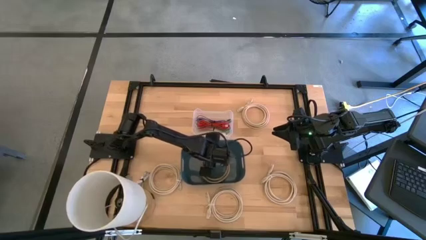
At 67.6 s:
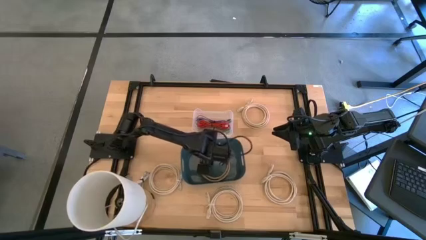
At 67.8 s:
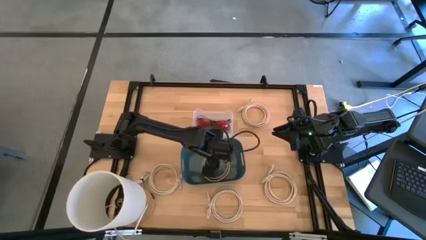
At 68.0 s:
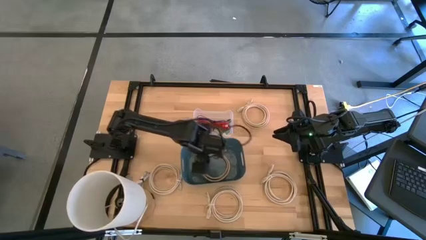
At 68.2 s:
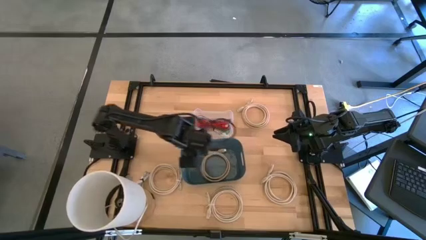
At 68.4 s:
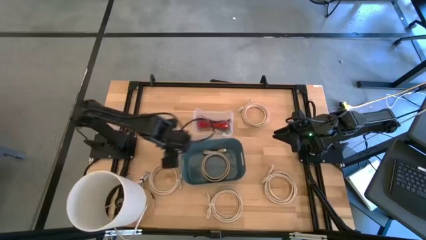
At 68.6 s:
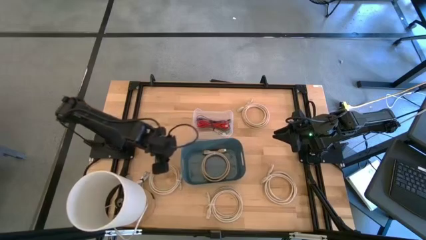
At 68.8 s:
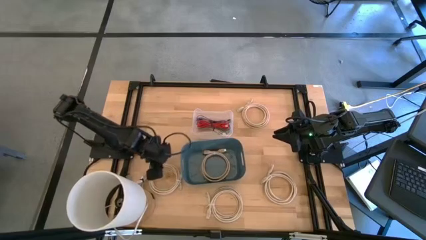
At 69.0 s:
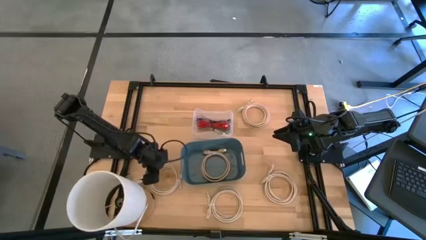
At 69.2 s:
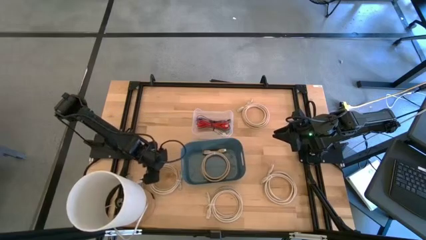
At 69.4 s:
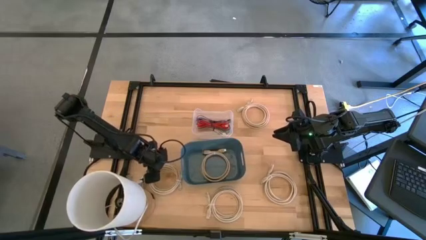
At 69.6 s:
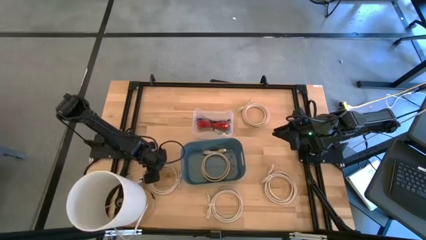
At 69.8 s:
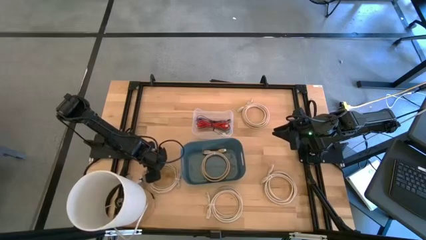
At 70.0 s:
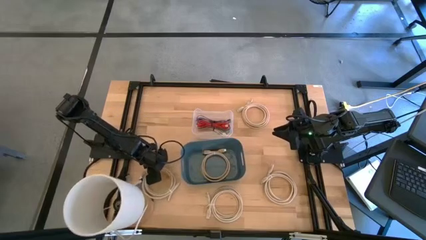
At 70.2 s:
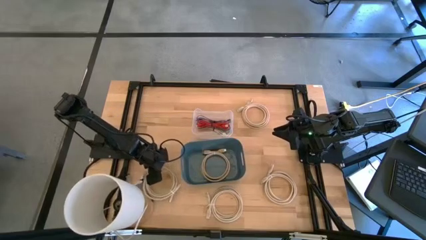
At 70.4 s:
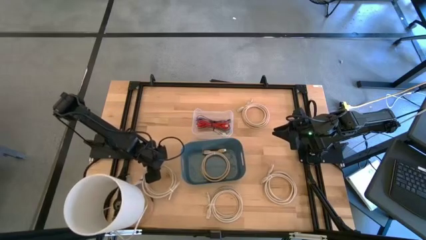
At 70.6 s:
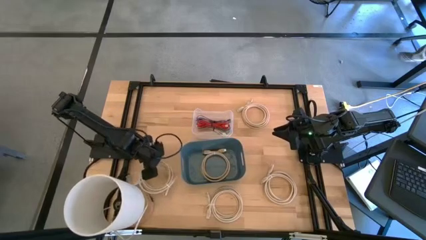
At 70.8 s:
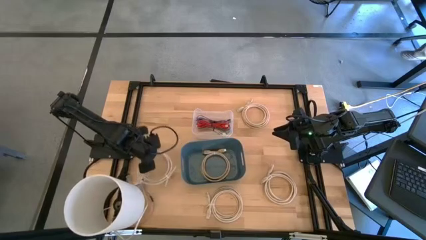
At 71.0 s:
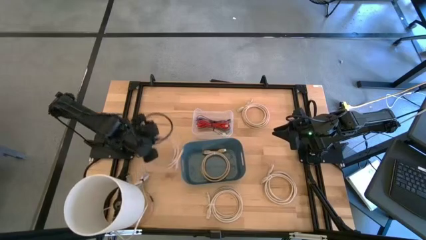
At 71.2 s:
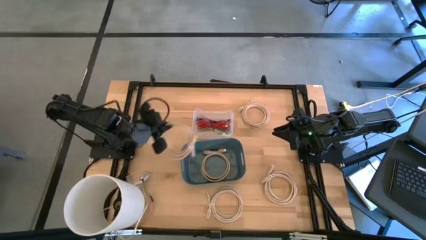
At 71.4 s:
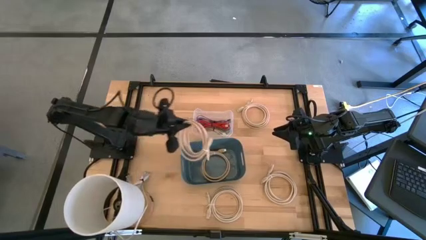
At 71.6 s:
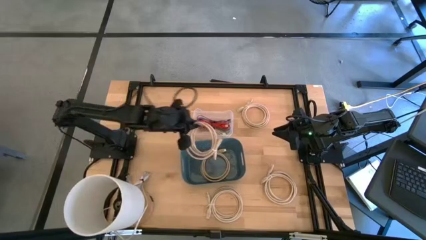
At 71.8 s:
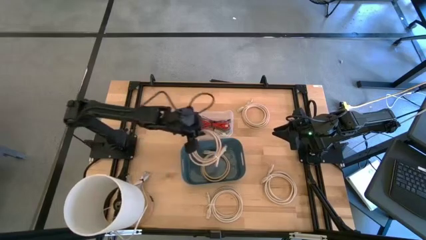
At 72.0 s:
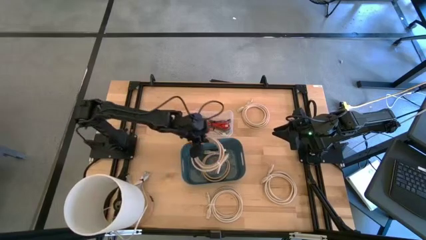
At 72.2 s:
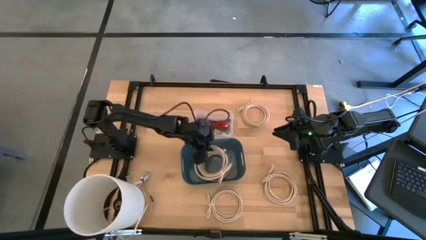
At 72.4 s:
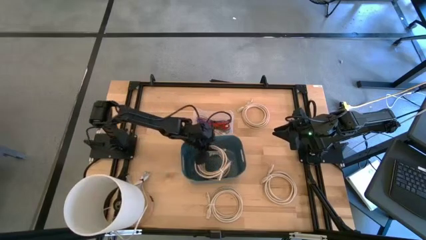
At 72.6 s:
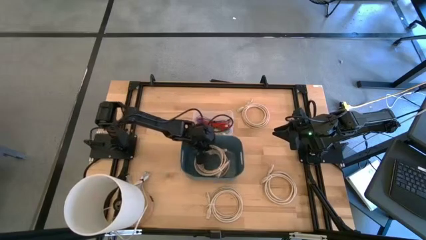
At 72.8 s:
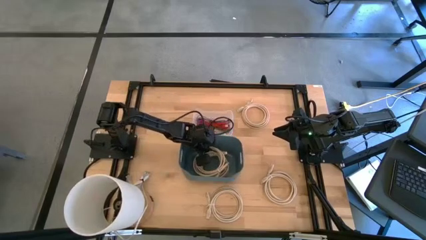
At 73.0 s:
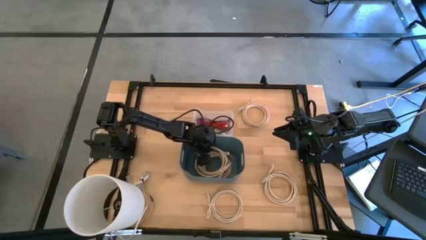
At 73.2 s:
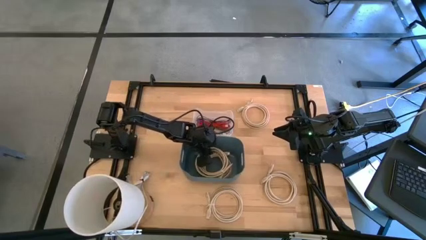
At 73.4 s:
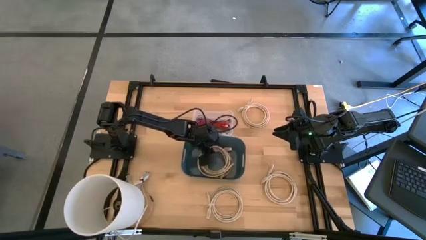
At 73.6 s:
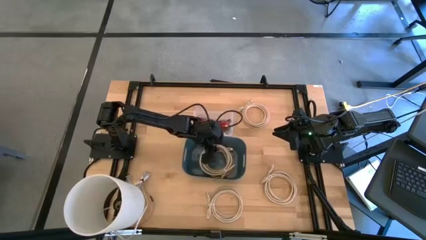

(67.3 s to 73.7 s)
Put the brown HDMI cable into the blue bin

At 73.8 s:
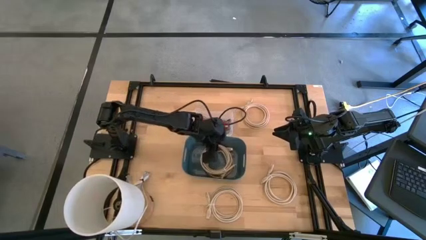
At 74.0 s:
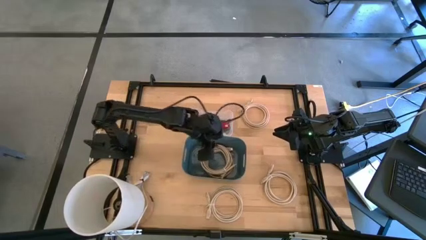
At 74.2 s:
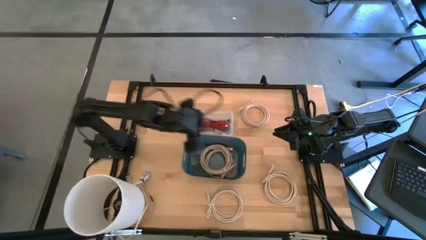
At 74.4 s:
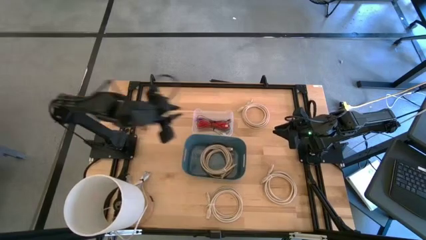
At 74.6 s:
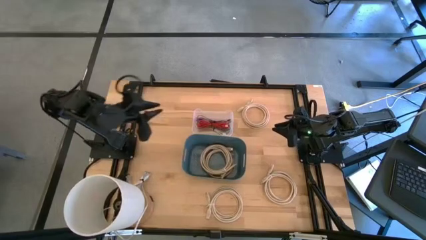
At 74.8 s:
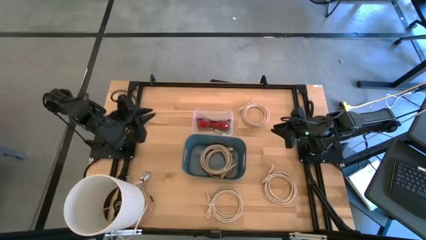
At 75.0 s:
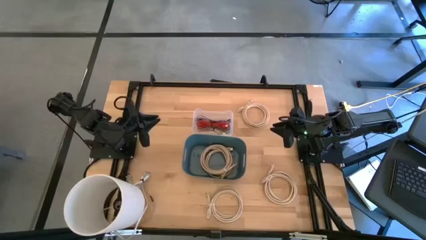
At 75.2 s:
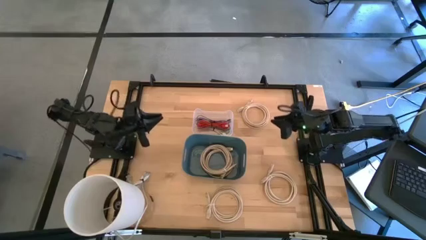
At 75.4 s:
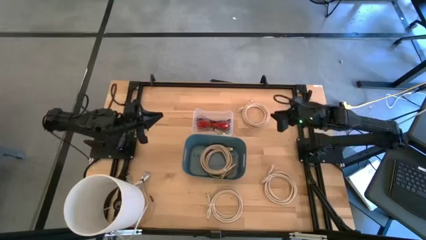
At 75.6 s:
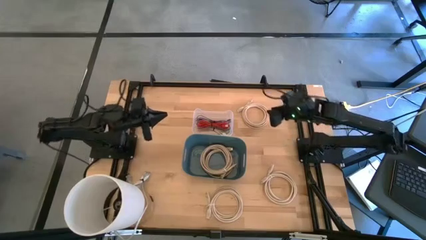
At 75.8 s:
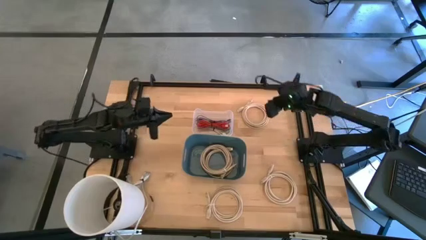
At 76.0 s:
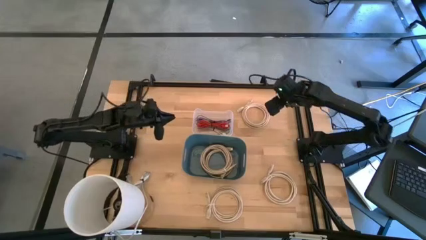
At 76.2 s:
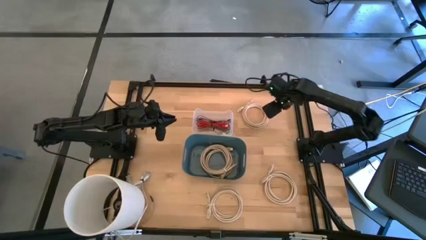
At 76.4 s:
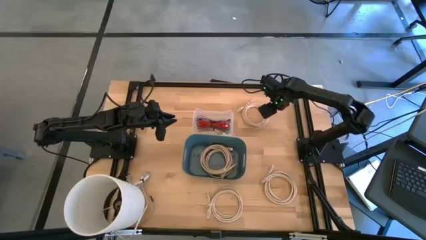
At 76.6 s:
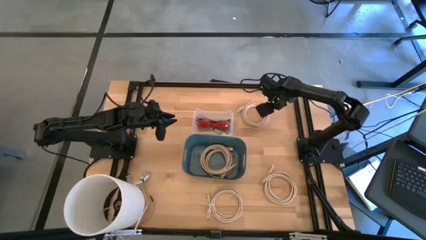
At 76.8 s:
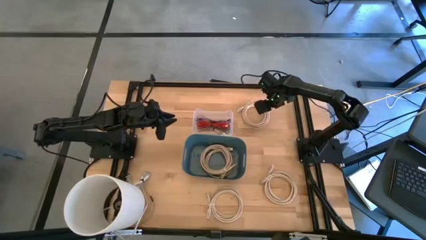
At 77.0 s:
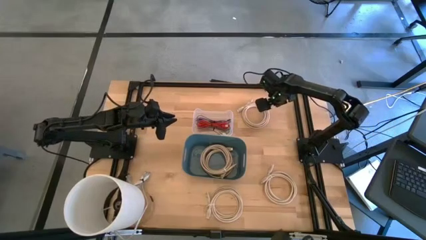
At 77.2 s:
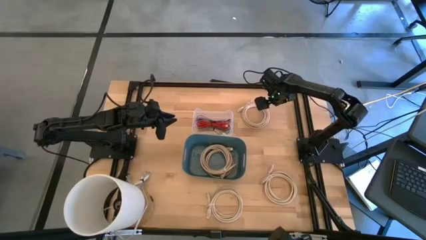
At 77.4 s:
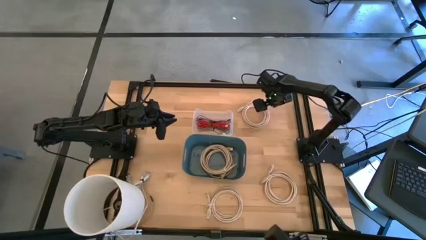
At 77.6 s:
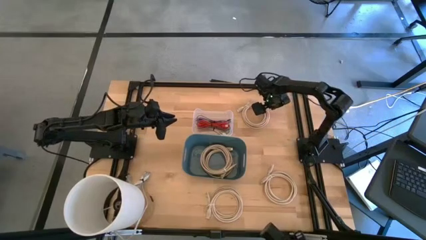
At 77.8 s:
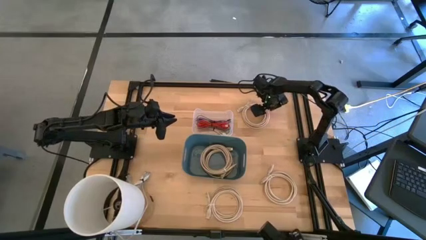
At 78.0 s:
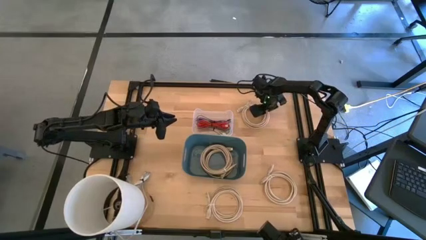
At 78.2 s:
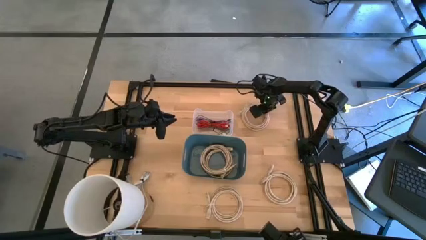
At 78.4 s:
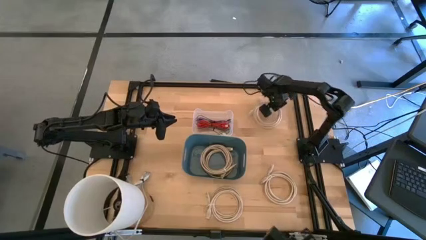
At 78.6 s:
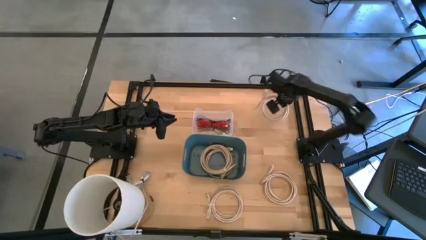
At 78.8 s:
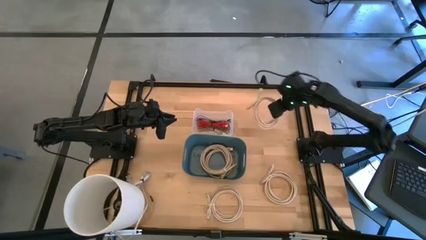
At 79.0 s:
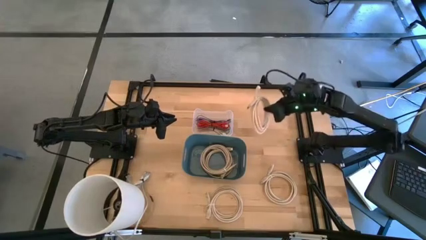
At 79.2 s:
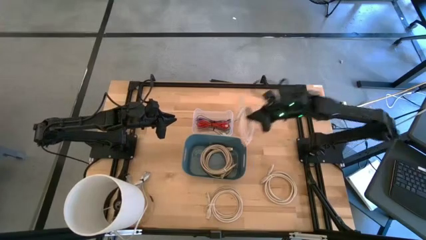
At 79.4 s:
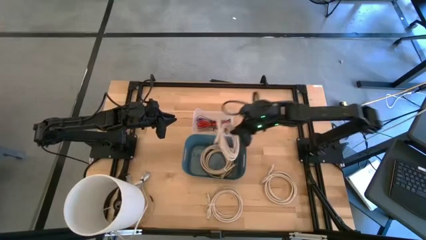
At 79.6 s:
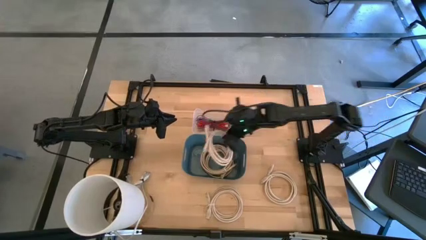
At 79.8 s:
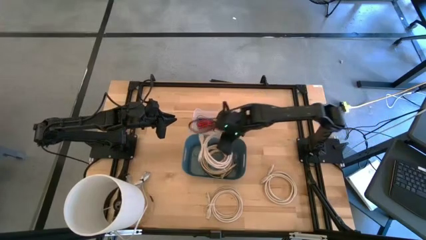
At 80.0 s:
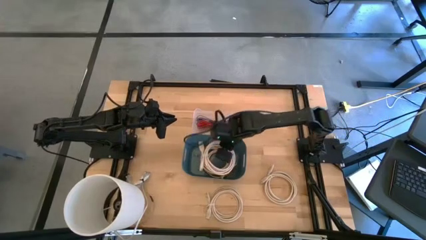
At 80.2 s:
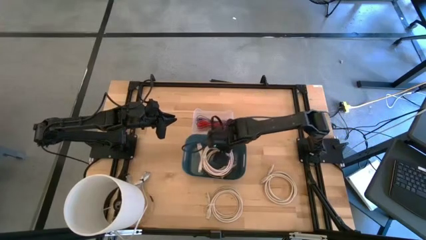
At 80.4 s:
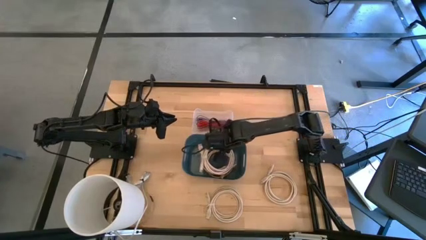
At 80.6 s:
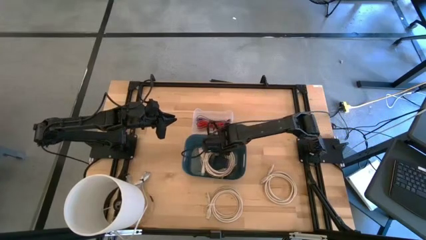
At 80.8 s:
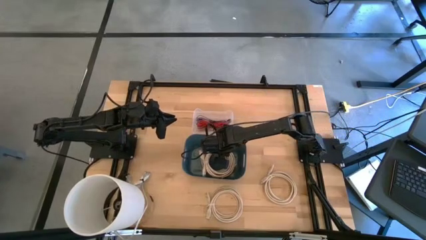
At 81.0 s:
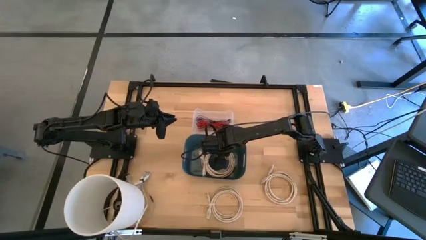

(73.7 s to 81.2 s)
Put the brown HDMI cable into the blue bin

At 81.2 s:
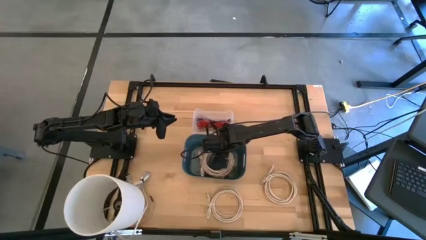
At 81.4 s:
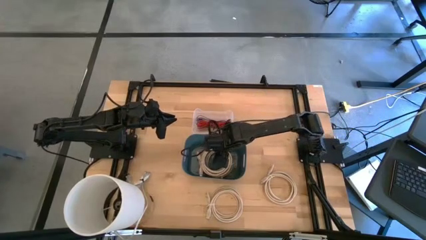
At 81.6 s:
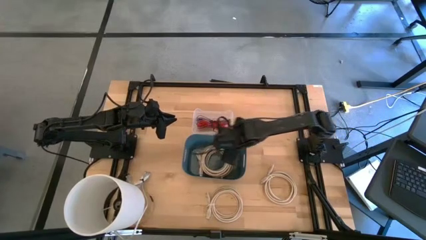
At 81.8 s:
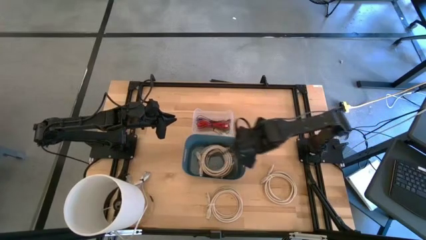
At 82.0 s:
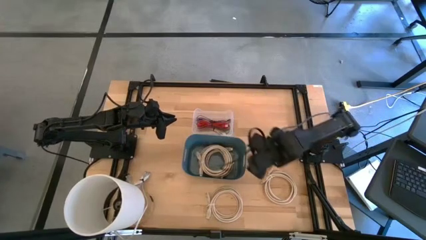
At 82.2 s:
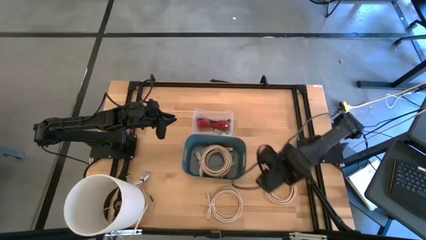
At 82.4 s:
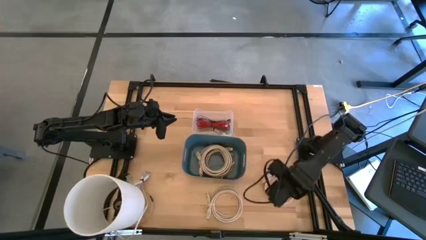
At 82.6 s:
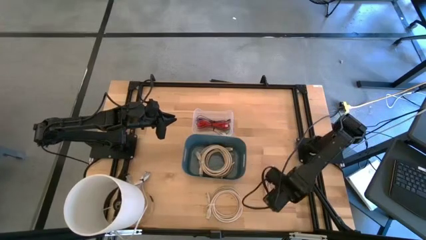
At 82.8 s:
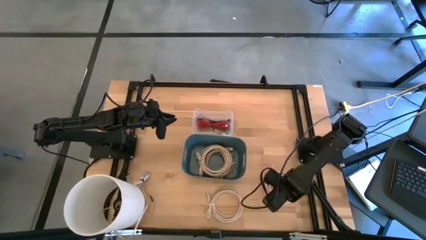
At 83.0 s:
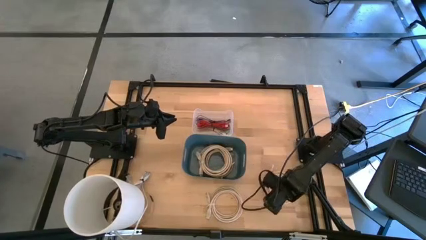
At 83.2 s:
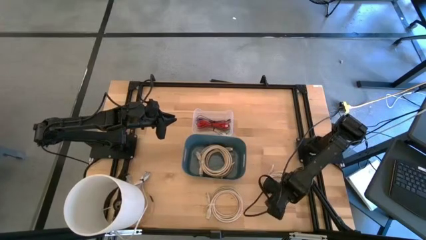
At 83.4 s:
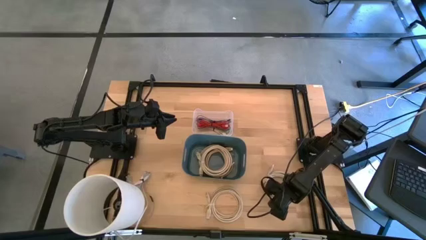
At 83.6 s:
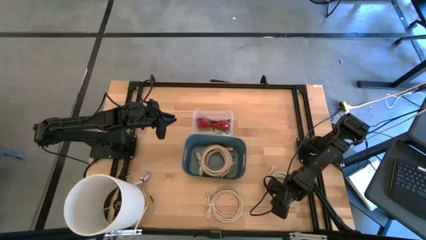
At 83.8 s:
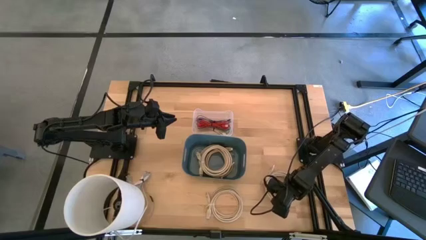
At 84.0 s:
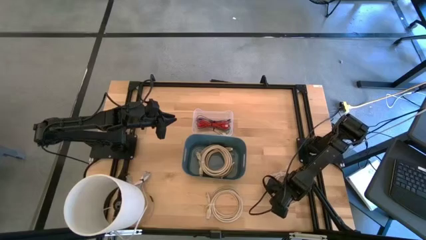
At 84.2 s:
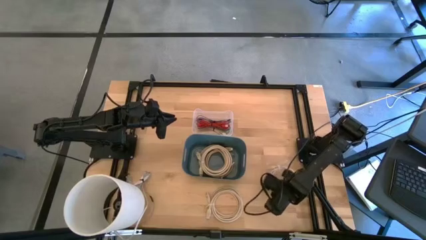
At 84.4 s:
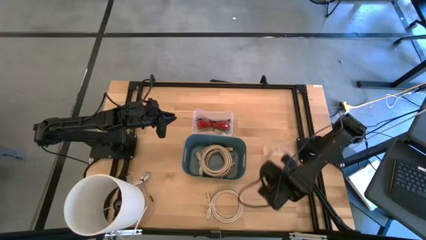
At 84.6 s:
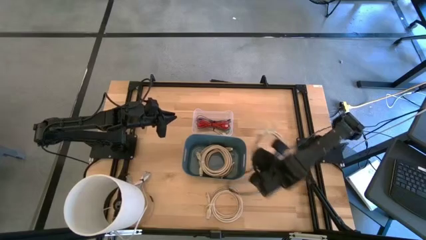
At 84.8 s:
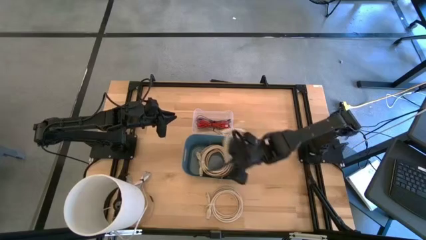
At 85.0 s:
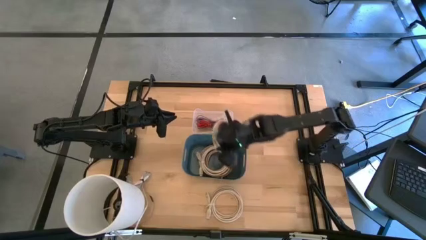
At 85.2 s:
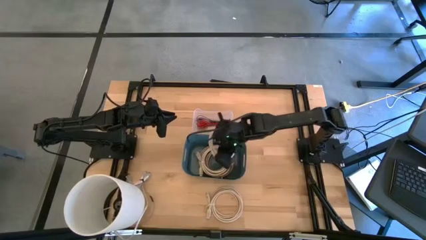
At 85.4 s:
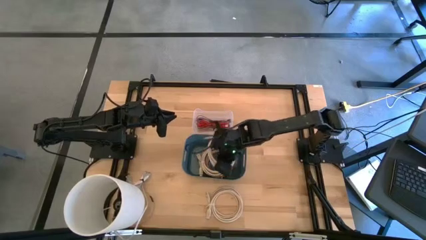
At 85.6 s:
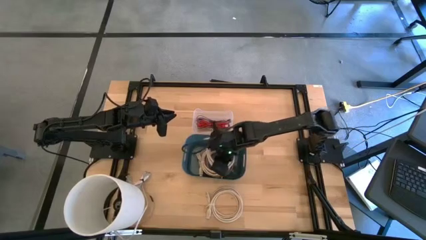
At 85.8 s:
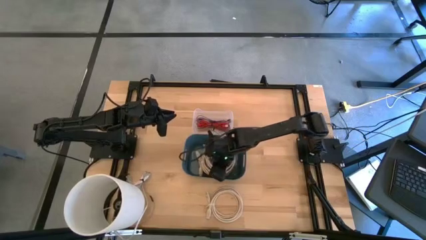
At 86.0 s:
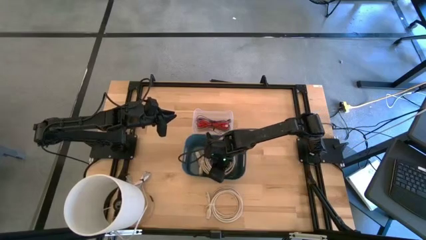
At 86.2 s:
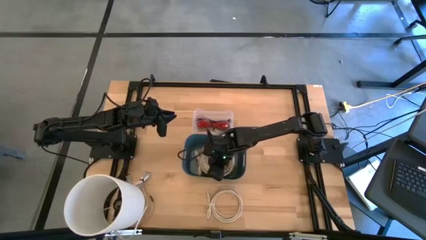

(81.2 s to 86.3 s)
Put the brown HDMI cable into the blue bin
